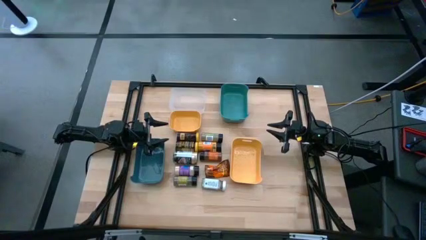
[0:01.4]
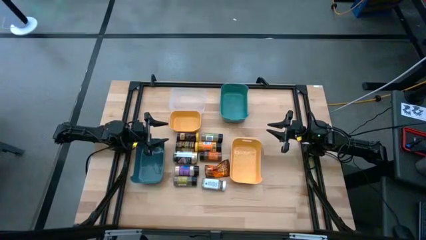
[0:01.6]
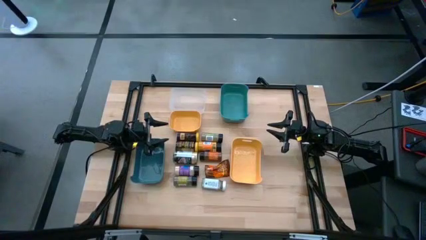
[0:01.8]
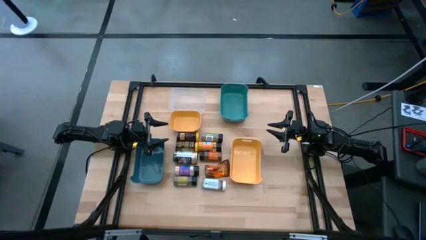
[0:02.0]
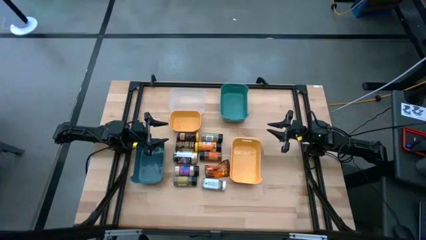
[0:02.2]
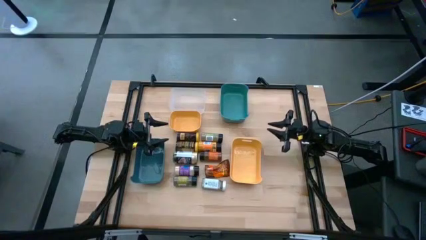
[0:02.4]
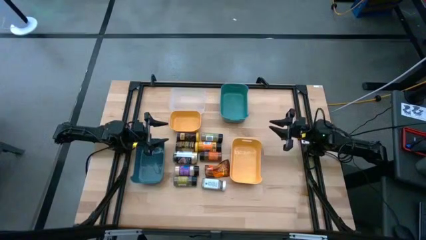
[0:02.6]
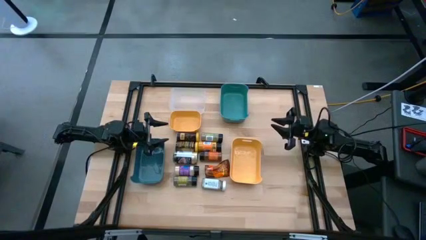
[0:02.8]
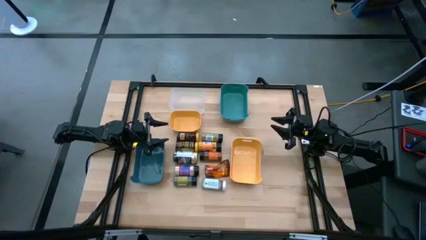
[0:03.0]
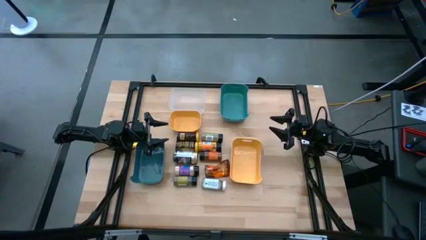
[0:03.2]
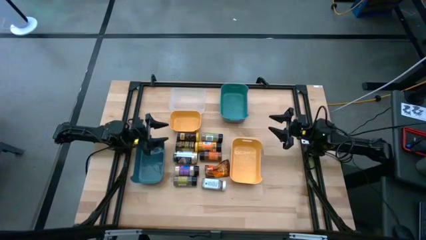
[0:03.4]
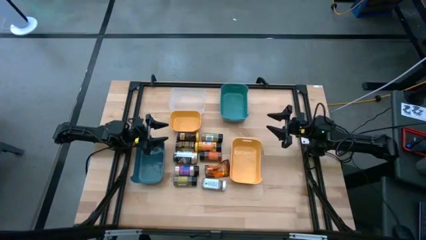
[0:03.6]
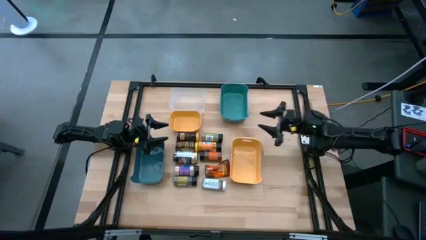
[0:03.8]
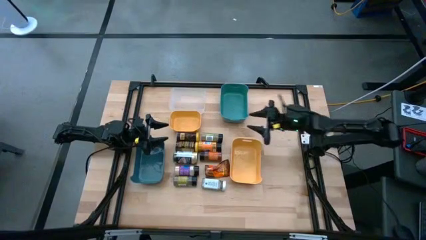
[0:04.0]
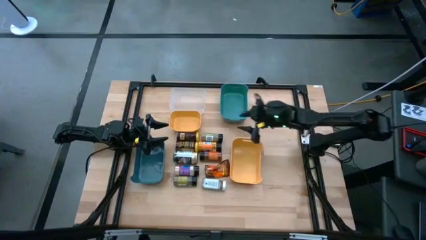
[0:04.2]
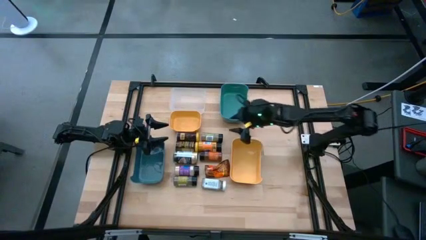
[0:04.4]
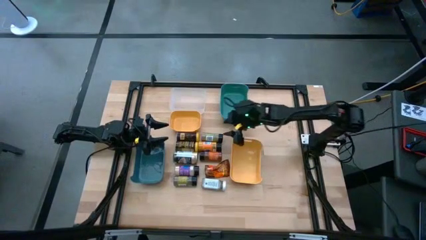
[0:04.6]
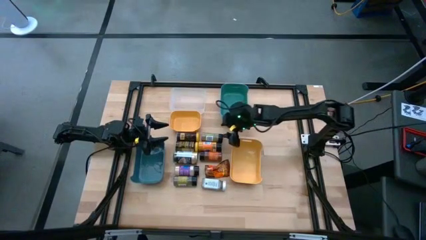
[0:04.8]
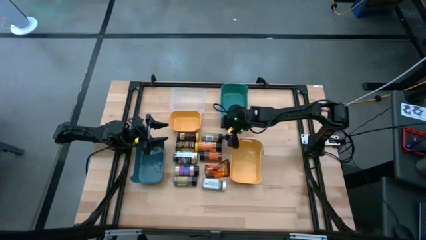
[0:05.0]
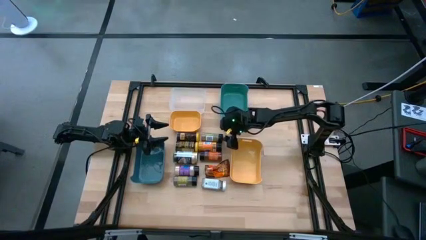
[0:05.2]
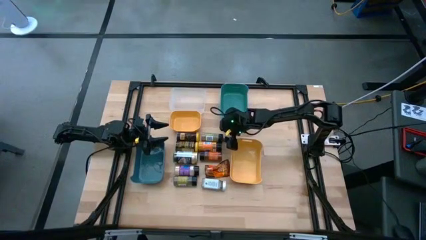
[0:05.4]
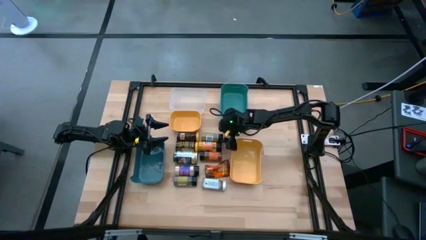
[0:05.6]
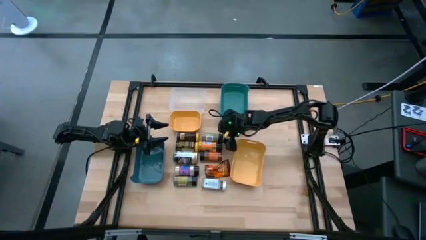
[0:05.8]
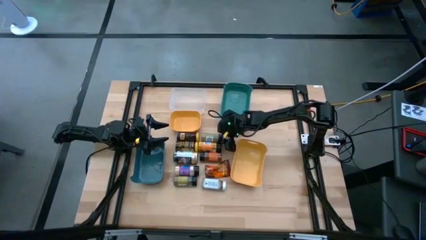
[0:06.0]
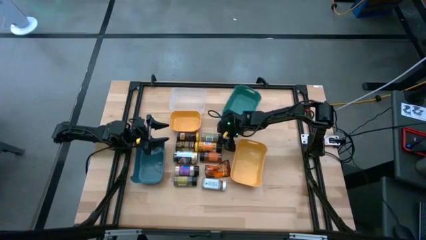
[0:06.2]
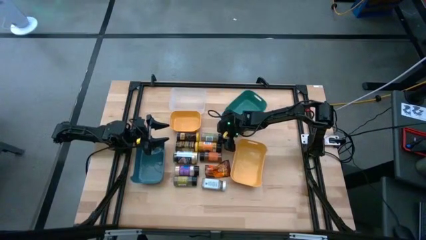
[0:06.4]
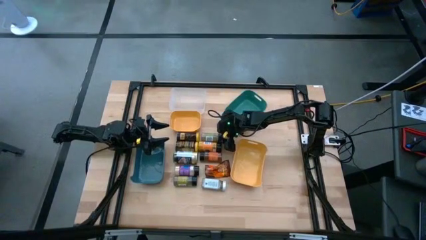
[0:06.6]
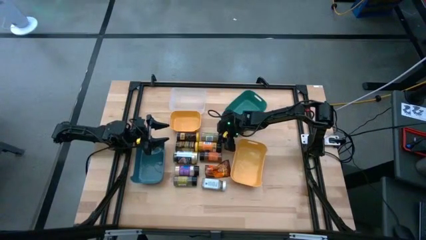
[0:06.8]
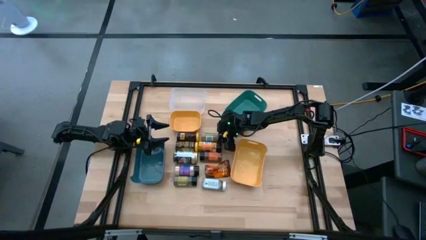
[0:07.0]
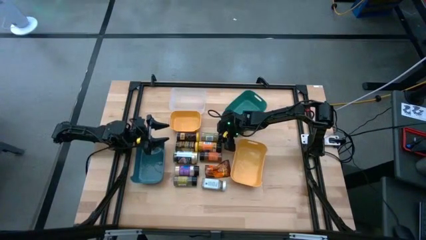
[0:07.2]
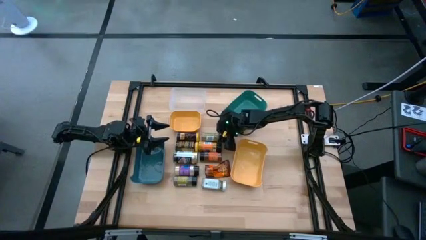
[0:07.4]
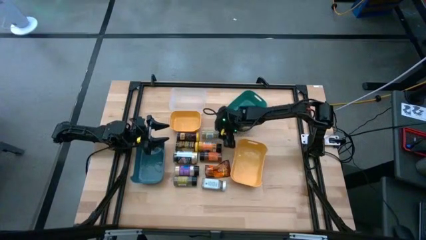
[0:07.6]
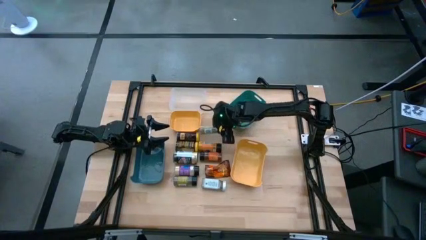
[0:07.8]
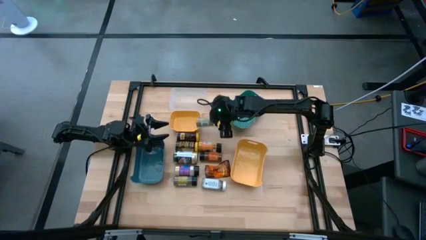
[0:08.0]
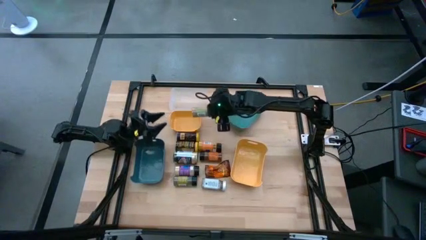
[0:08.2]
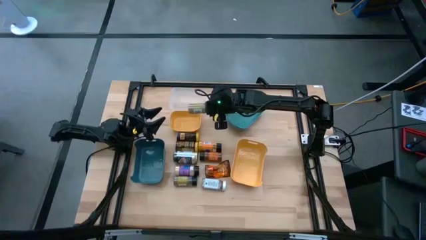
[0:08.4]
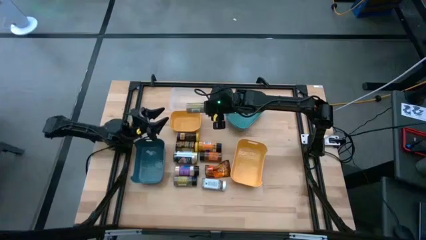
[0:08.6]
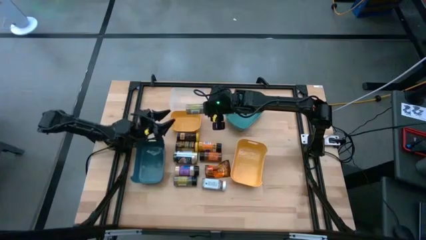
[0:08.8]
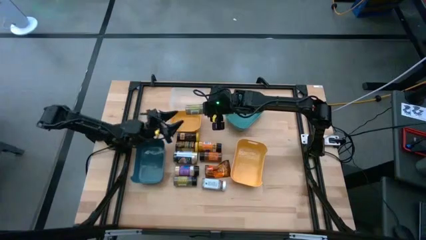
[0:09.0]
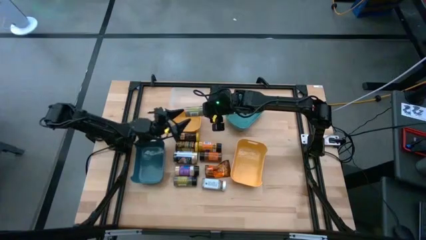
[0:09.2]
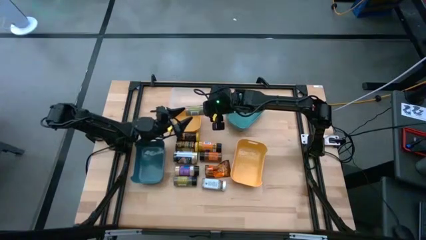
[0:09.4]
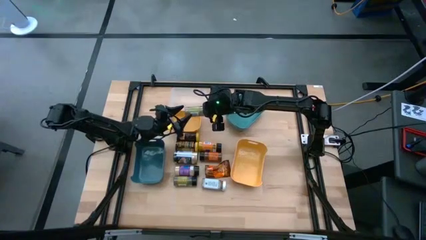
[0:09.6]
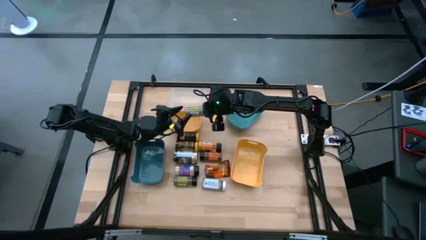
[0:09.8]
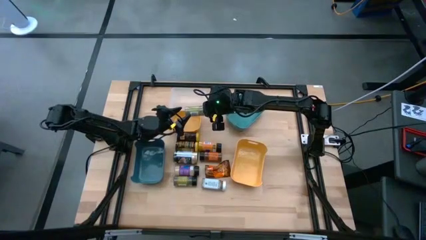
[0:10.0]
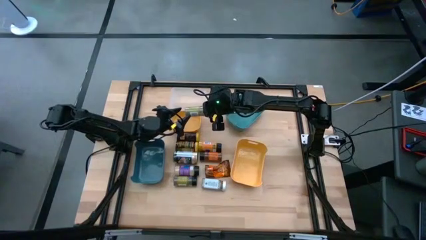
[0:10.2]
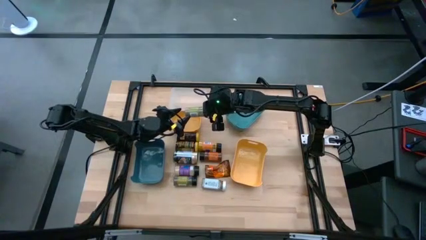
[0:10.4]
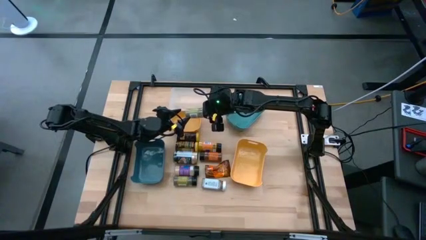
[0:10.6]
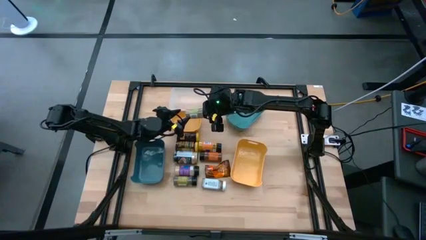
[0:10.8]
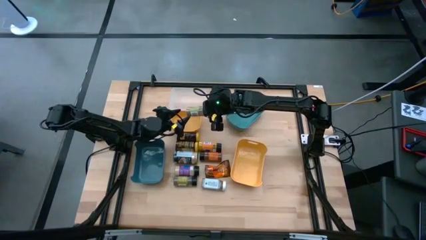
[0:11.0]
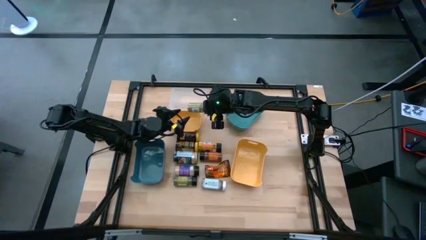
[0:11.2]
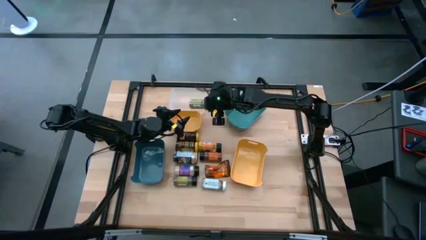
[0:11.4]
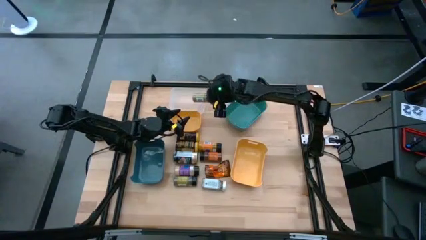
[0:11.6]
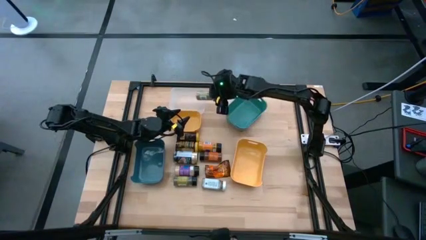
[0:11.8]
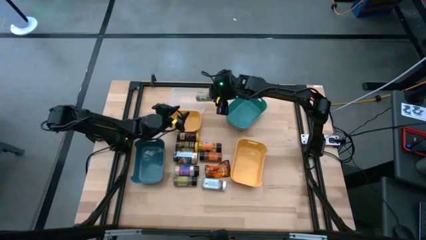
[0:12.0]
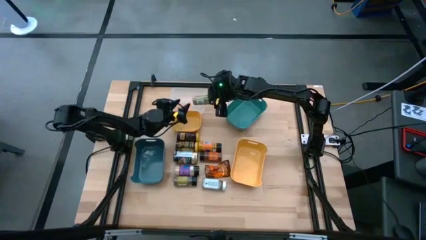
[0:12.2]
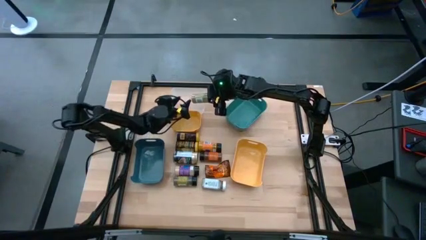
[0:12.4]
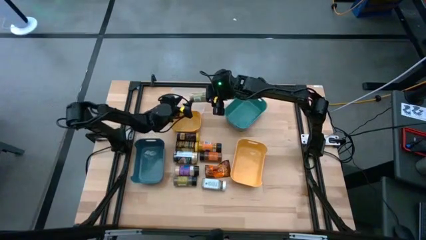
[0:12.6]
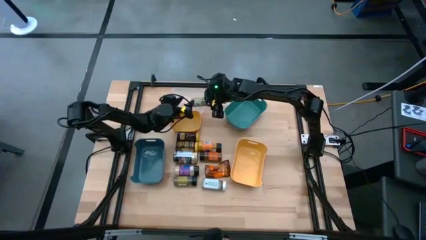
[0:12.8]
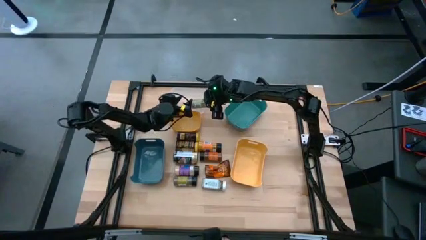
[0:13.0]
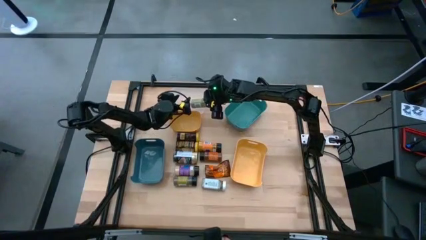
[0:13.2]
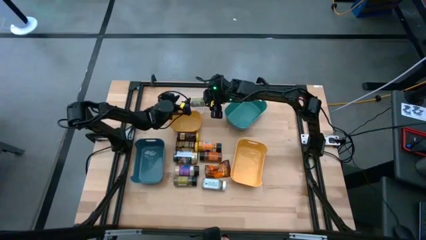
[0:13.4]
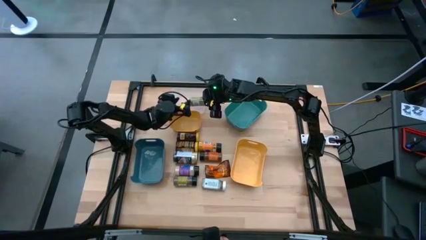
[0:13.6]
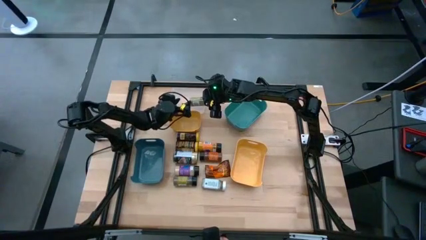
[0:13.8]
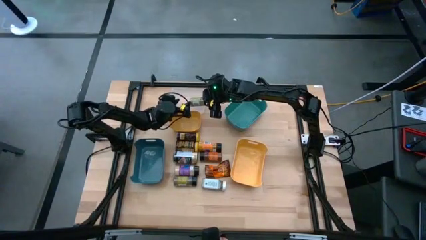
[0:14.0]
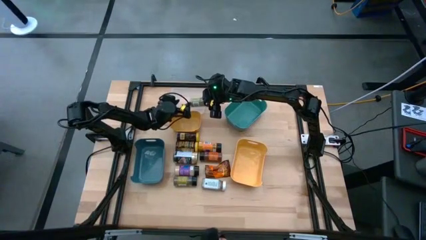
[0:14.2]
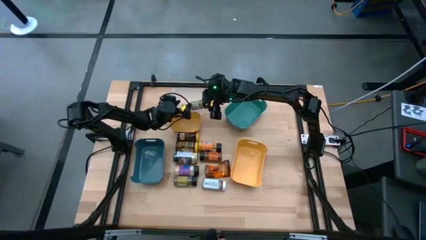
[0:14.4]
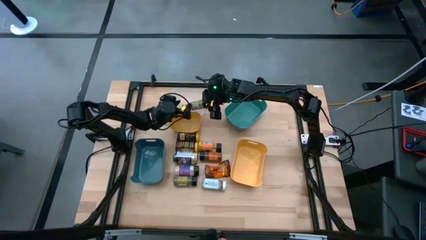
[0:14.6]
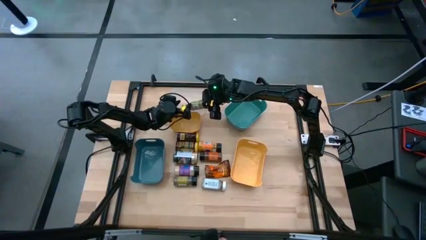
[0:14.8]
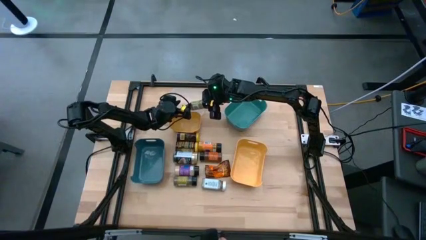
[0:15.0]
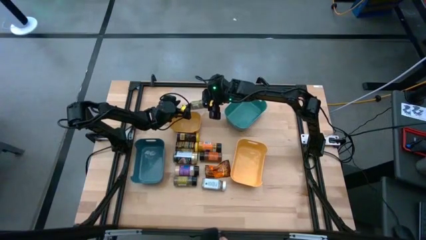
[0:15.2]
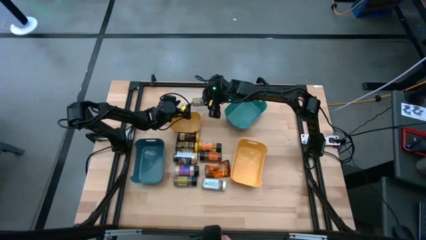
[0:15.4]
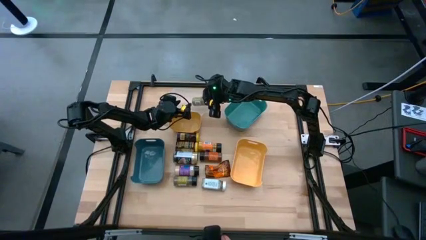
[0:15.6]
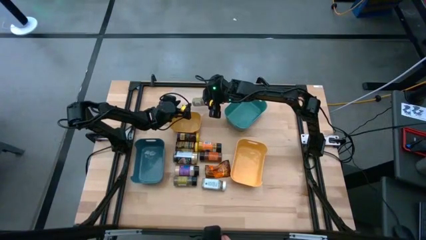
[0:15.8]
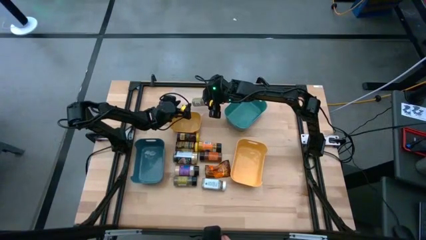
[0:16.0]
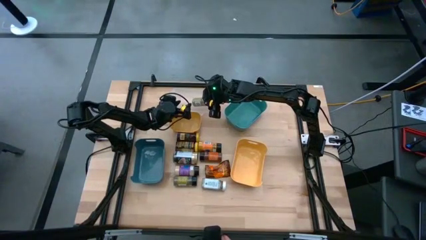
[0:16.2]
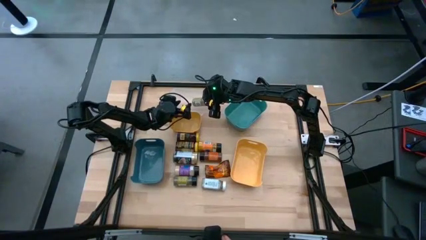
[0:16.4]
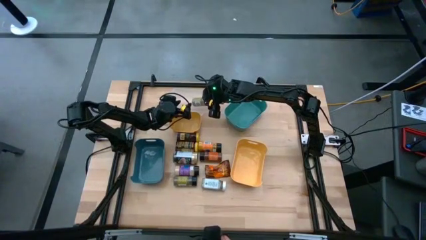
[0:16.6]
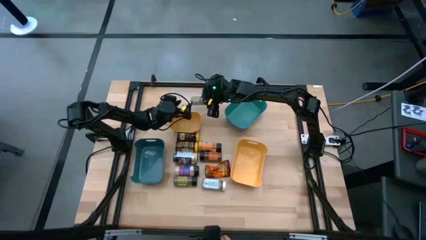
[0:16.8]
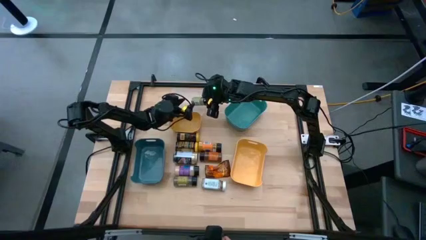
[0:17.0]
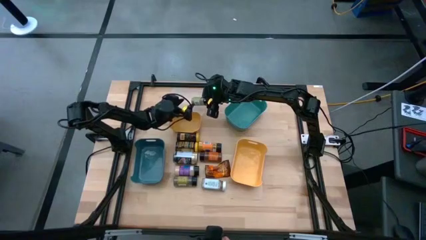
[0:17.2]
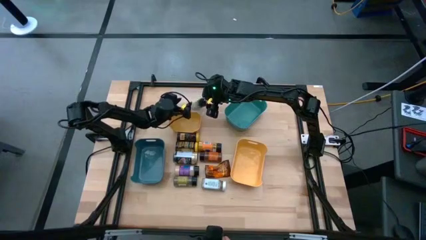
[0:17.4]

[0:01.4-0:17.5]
Task: Sort spices by type
Put the black seasoning bottle into the transparent bin
